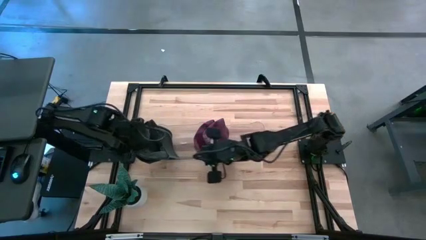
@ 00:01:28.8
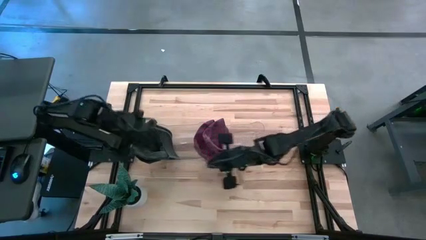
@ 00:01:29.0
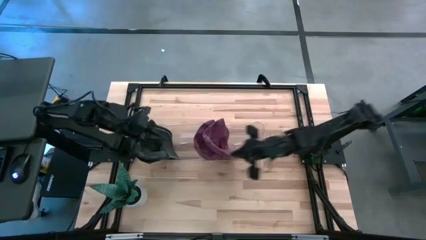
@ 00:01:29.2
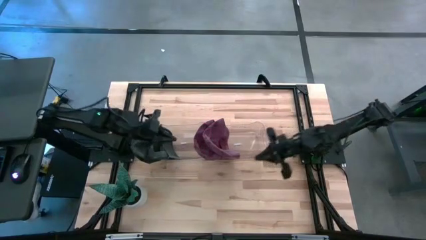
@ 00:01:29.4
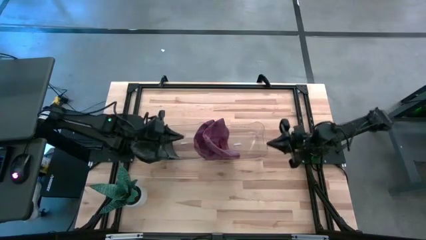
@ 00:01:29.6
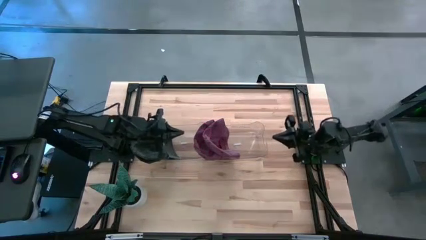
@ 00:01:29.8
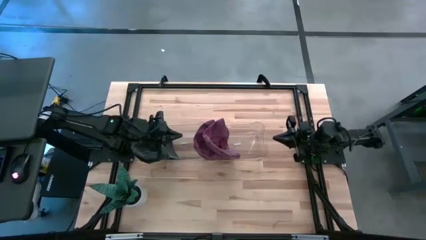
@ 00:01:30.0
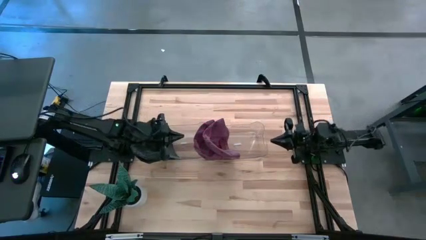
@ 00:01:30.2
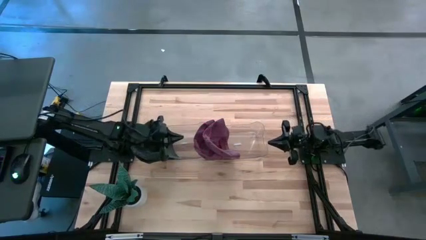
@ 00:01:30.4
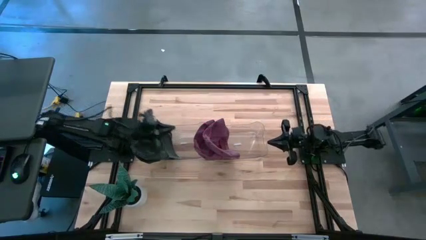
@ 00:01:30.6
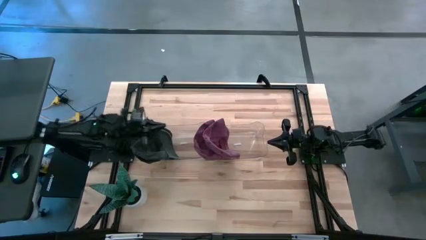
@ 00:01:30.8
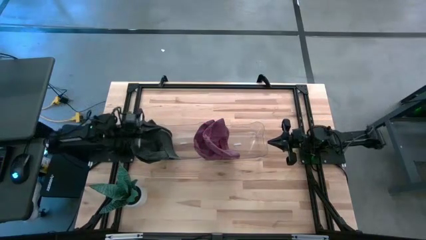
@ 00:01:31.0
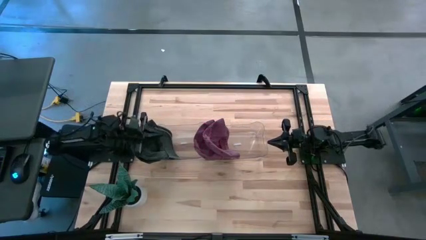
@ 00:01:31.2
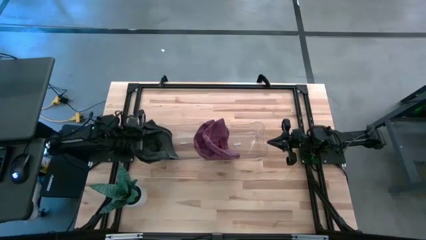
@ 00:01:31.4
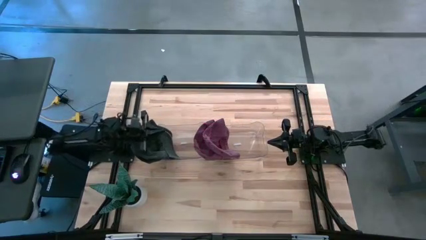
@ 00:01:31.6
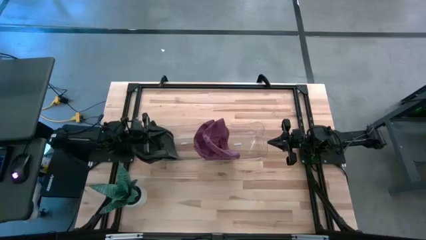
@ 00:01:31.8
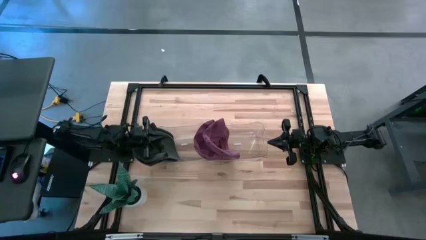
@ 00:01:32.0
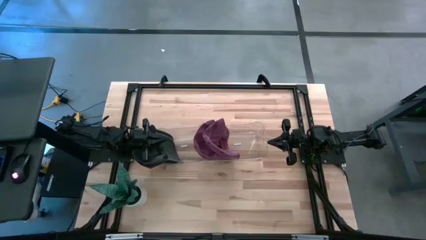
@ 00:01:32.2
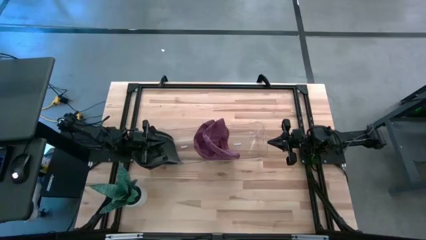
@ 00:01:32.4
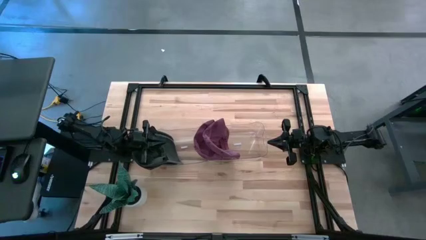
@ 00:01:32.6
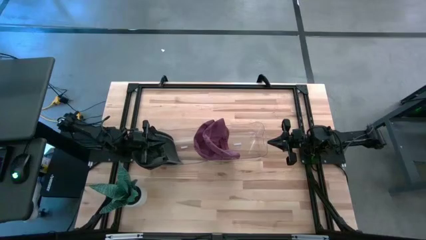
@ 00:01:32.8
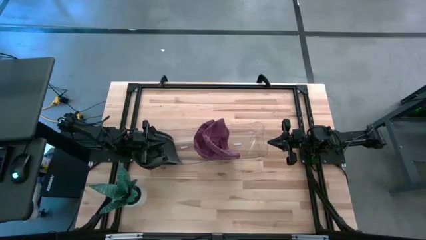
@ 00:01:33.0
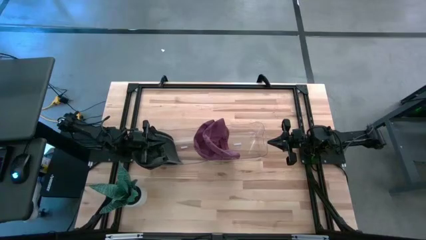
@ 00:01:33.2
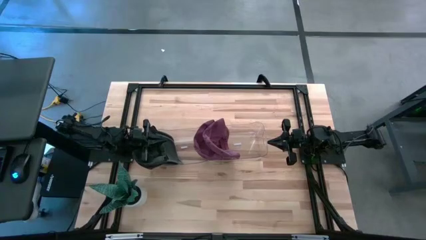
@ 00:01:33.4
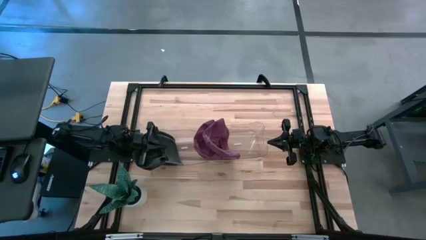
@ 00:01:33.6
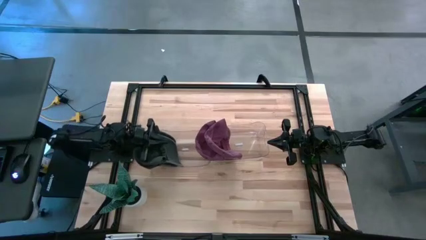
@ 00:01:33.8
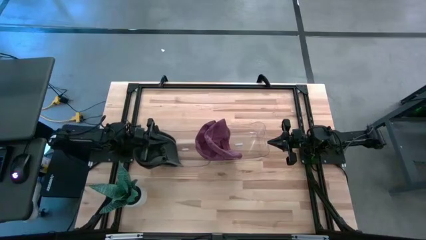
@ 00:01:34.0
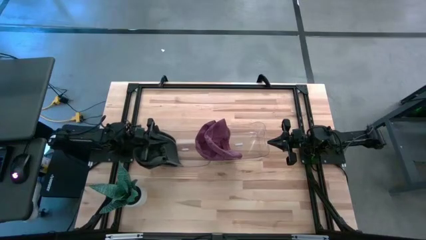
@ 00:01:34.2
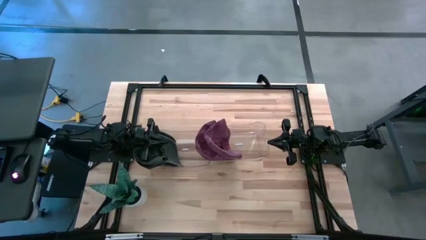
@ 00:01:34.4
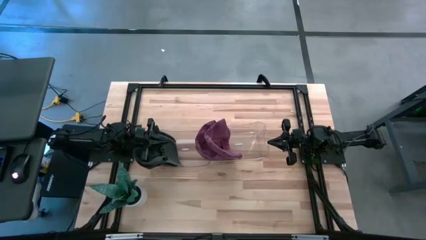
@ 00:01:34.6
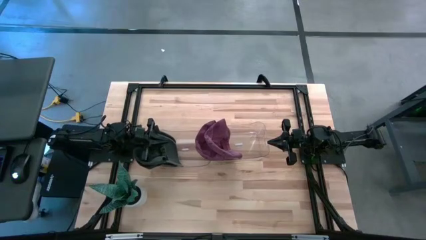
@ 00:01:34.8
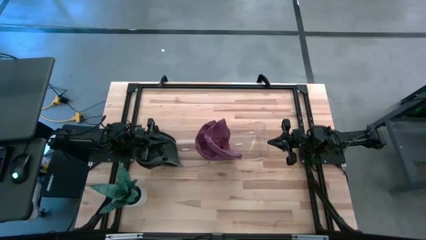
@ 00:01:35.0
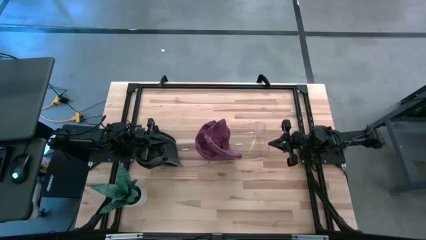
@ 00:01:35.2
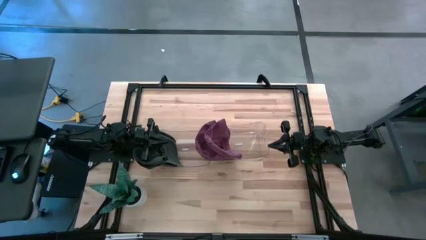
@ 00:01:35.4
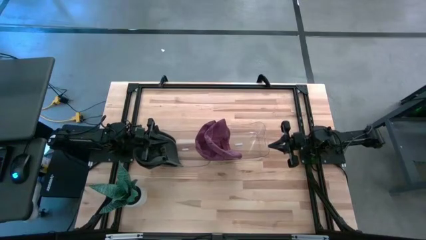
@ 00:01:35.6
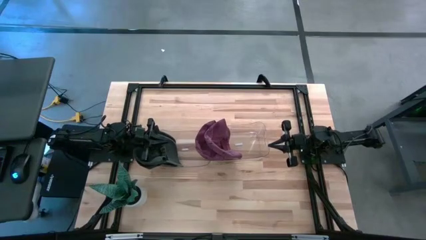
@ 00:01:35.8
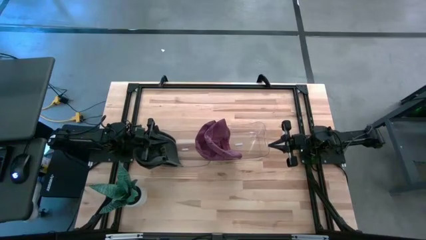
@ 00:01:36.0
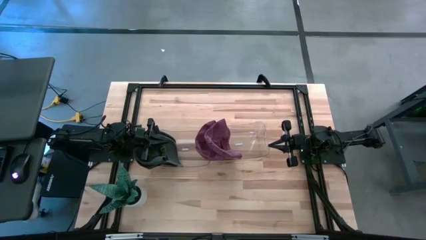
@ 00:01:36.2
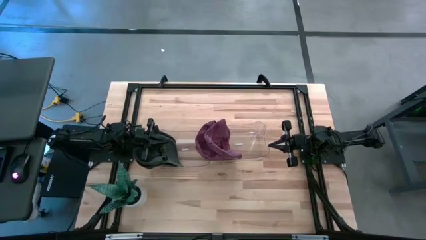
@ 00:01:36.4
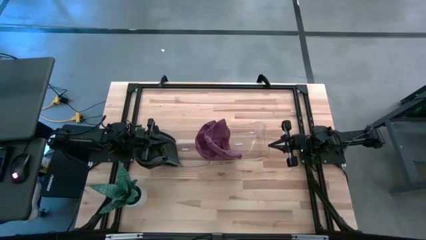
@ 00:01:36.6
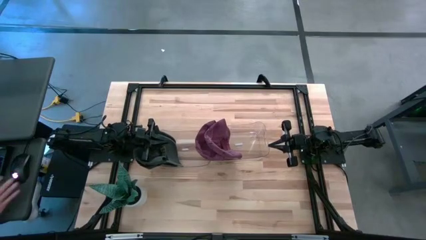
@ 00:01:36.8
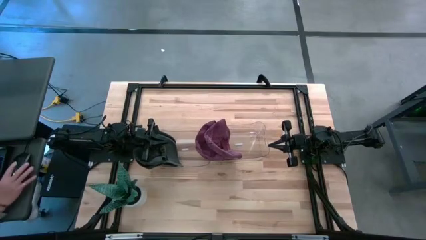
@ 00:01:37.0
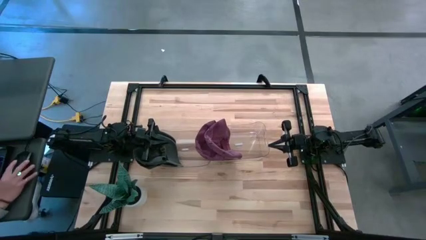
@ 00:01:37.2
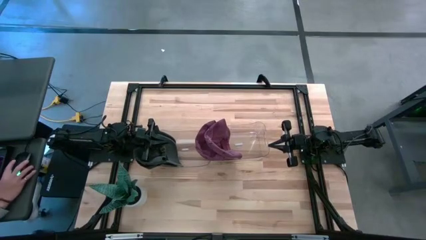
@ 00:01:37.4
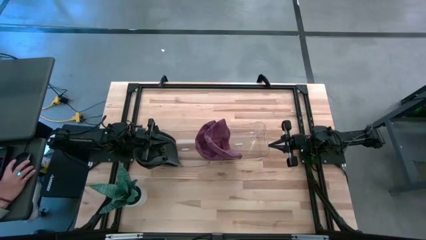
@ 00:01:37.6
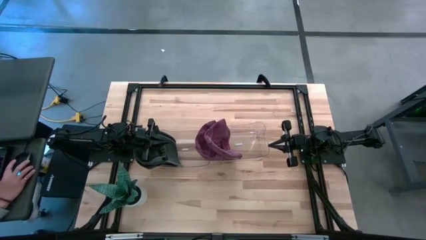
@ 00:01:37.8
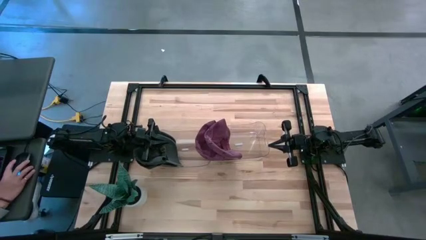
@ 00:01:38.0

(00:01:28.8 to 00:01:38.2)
Task: Pick & Place hat
Return to Home Position

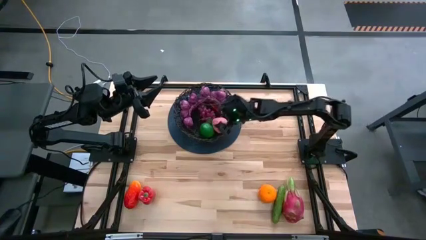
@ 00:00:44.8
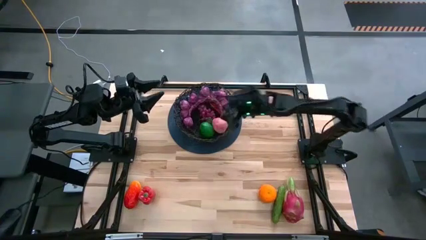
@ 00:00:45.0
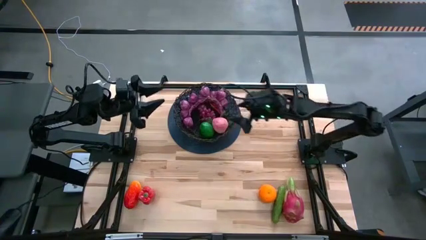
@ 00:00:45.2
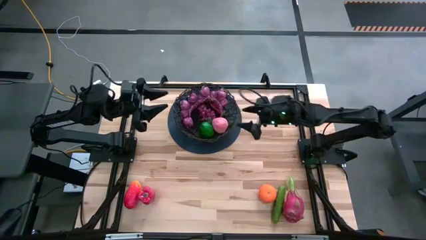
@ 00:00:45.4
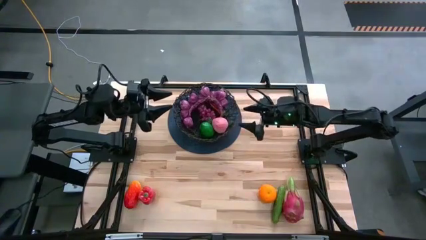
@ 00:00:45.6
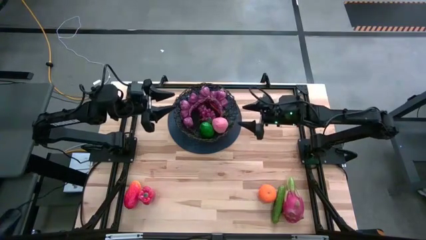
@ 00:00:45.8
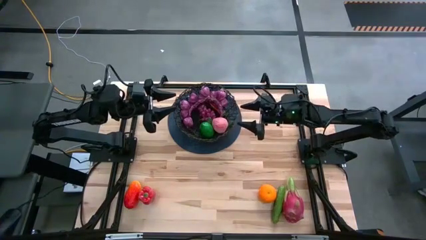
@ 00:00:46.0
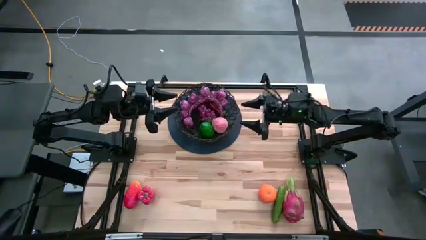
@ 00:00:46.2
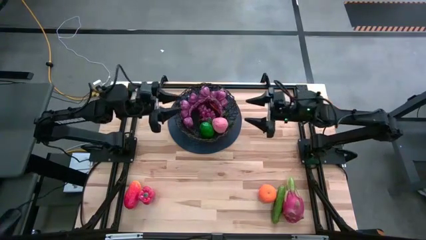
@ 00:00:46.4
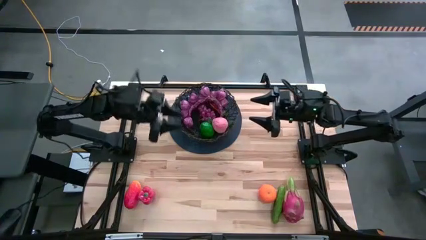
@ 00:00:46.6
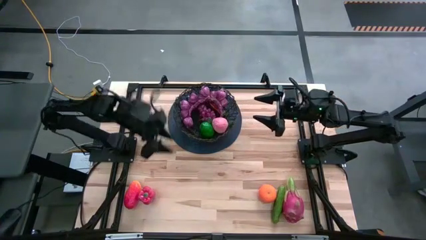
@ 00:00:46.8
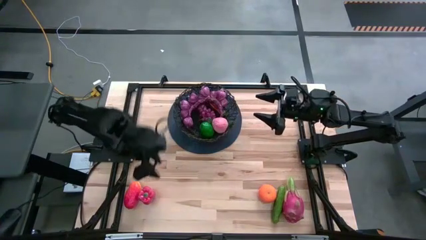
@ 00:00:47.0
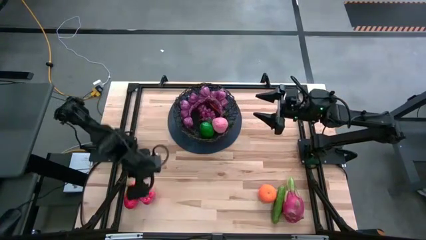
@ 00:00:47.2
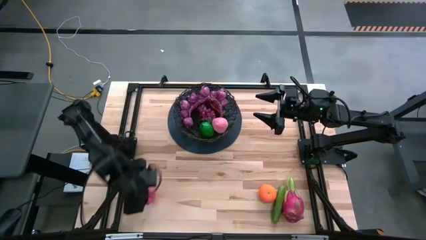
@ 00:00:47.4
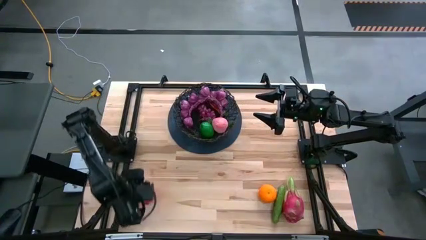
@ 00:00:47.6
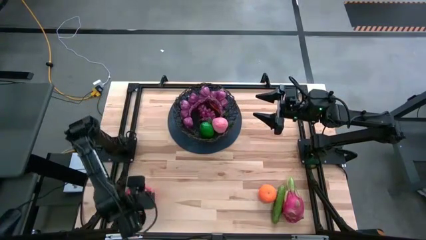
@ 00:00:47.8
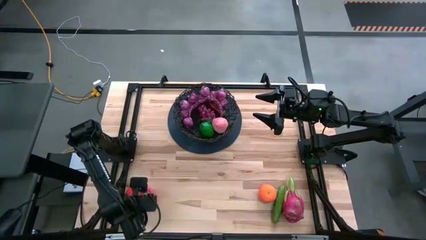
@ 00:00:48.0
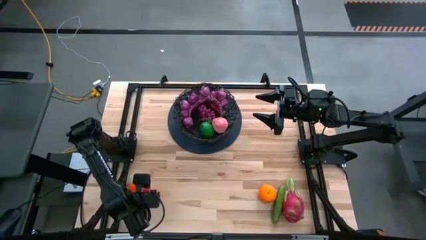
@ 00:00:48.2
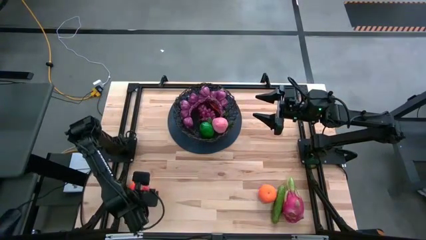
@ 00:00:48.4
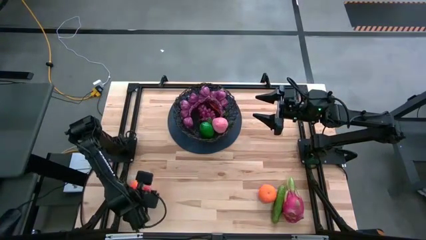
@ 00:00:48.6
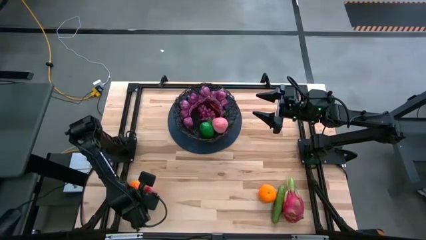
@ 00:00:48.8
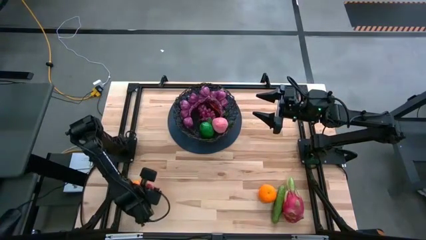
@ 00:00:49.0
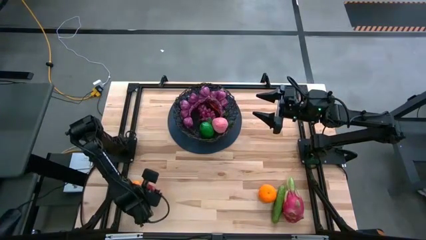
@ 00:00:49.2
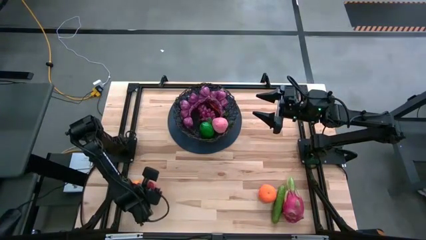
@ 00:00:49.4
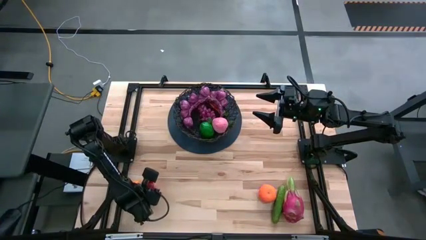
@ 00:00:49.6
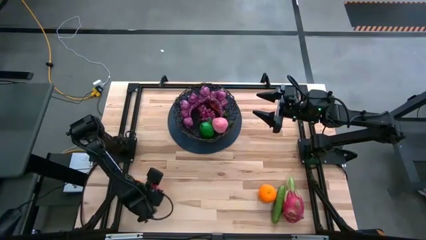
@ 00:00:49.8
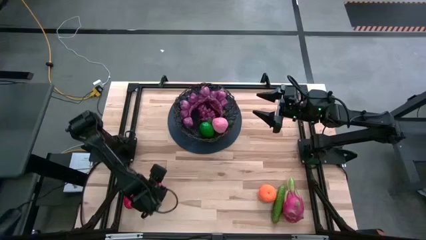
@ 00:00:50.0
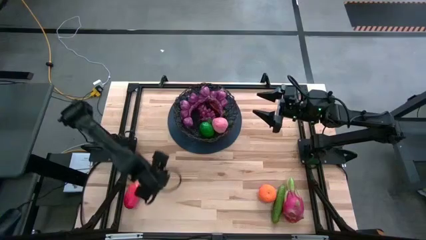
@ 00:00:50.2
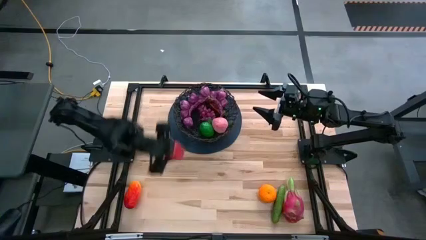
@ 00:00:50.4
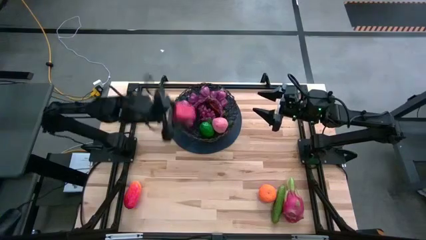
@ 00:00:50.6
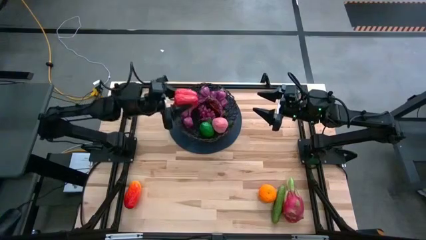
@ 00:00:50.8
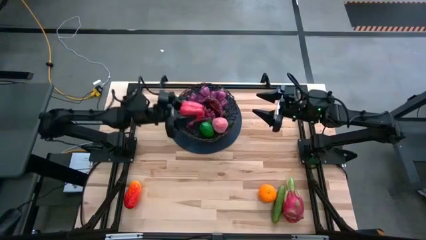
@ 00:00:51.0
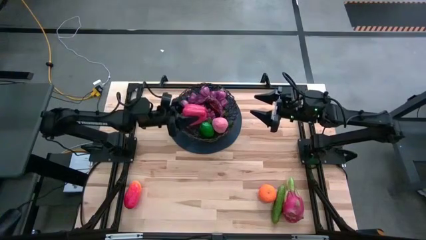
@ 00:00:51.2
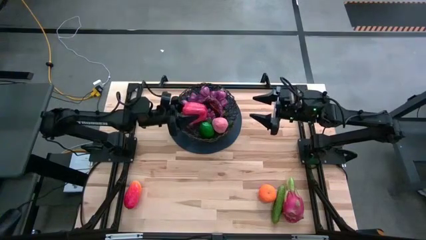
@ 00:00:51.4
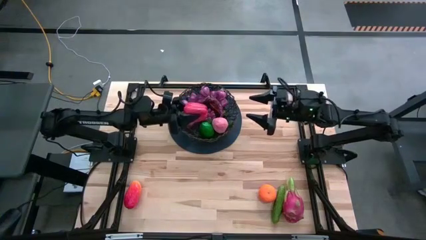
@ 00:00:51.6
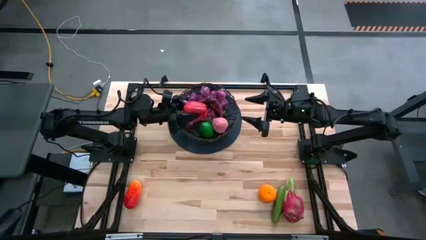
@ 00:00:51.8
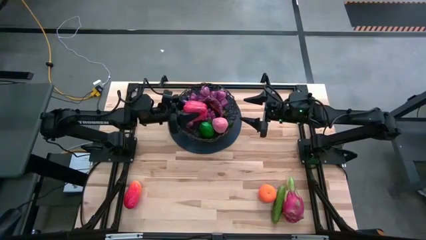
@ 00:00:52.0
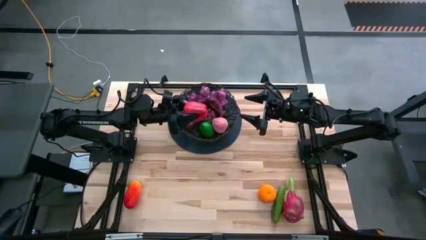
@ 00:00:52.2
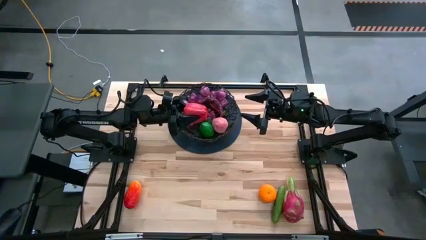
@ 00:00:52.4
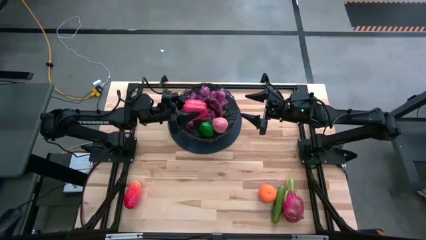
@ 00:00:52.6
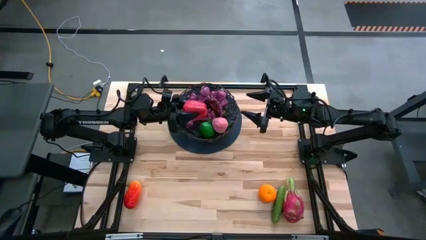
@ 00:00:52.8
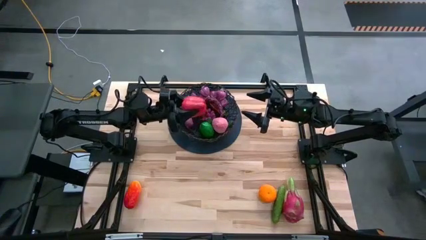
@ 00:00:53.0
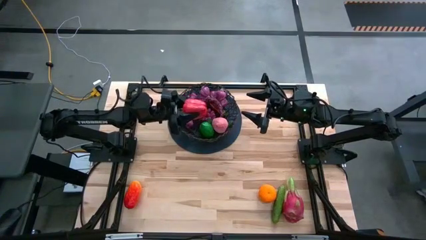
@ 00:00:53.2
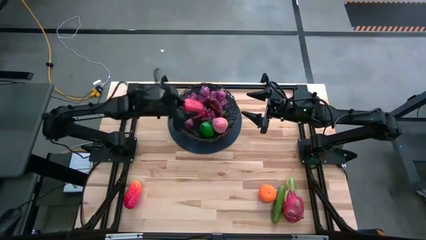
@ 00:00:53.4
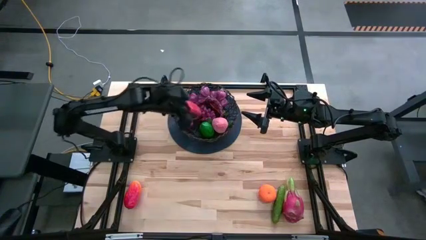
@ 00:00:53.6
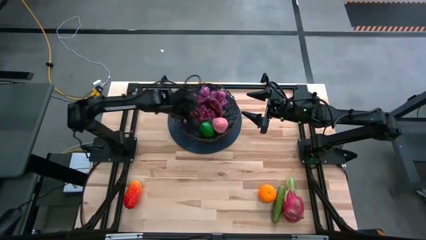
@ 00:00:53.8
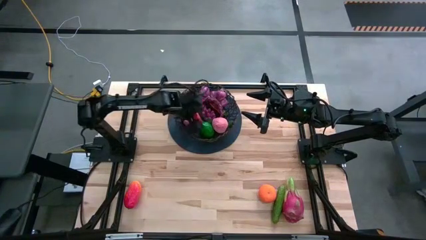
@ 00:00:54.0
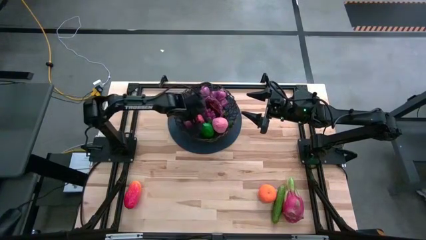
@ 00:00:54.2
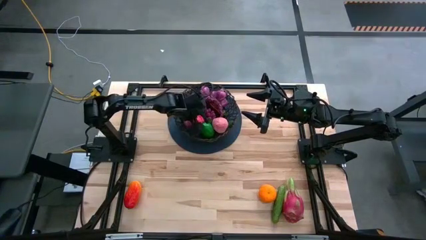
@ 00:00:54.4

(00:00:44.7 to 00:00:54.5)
Task: Build produce basket
Put the red bell pepper into the wire basket
